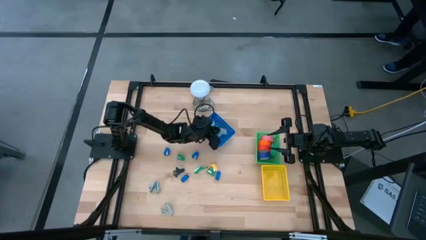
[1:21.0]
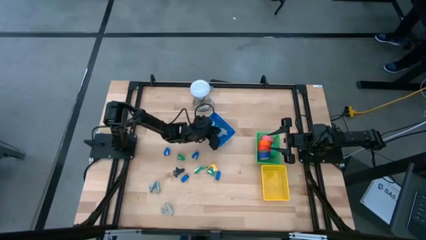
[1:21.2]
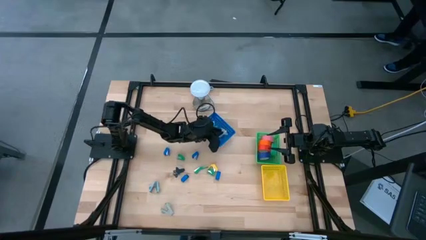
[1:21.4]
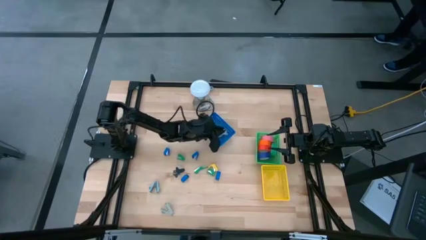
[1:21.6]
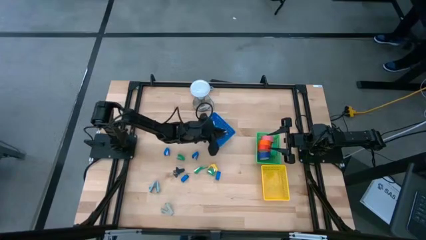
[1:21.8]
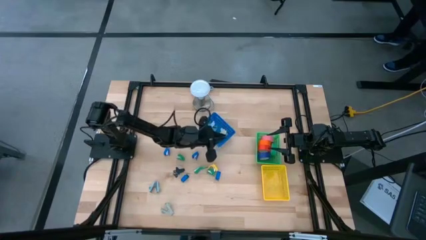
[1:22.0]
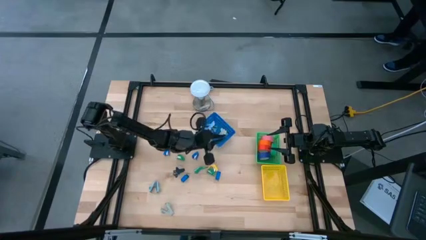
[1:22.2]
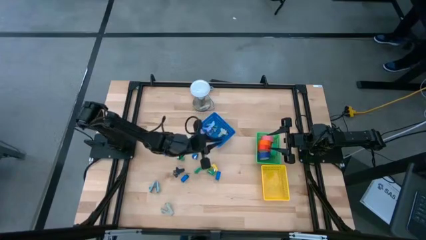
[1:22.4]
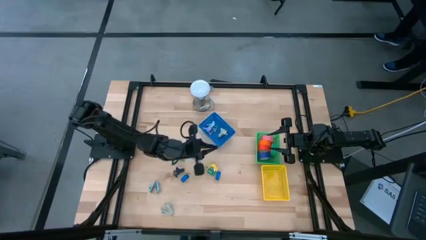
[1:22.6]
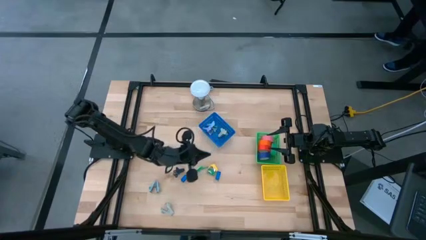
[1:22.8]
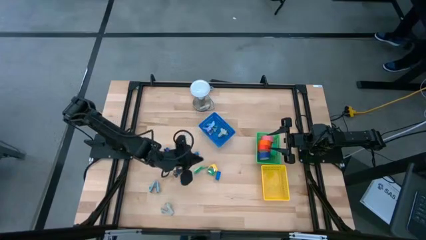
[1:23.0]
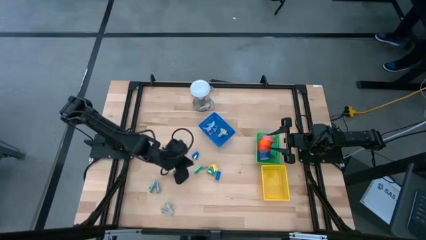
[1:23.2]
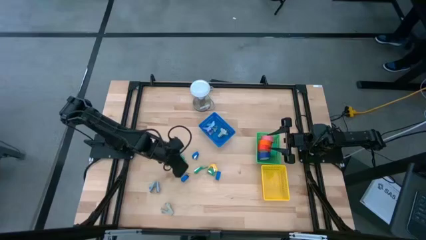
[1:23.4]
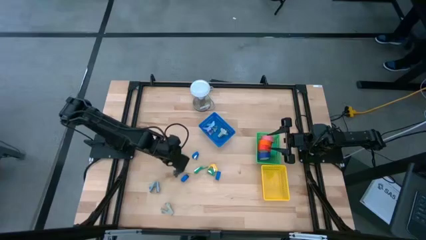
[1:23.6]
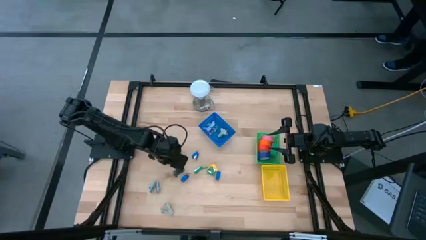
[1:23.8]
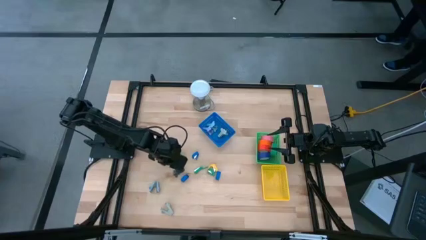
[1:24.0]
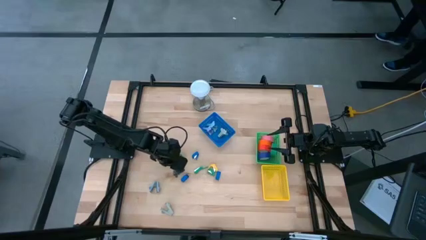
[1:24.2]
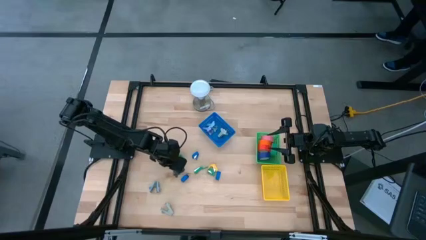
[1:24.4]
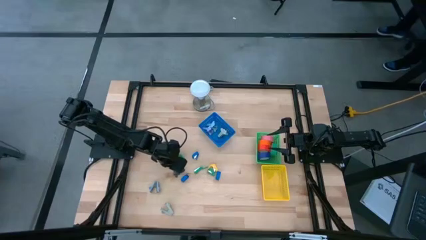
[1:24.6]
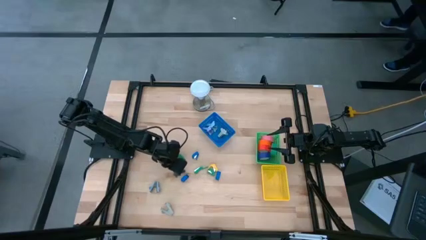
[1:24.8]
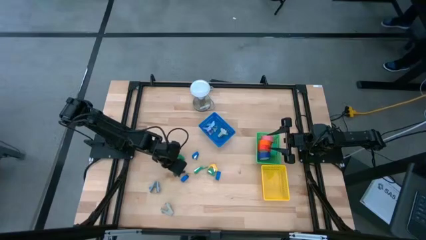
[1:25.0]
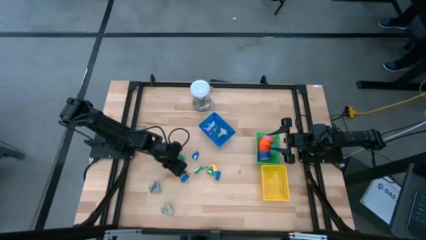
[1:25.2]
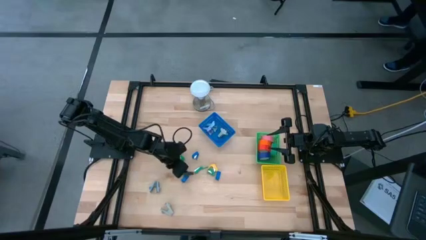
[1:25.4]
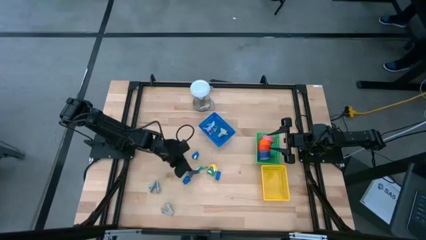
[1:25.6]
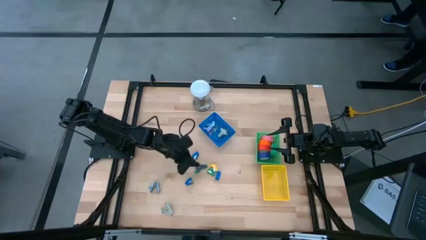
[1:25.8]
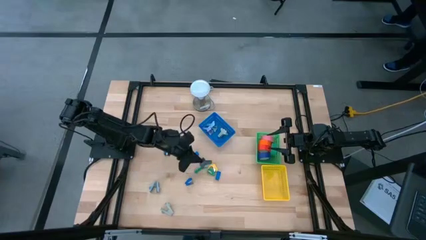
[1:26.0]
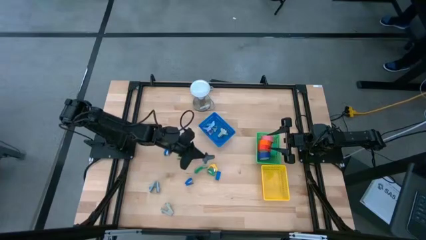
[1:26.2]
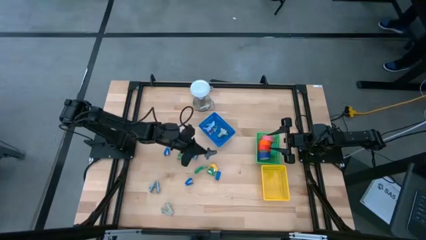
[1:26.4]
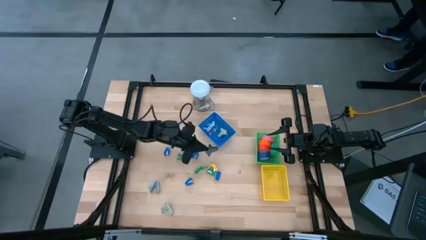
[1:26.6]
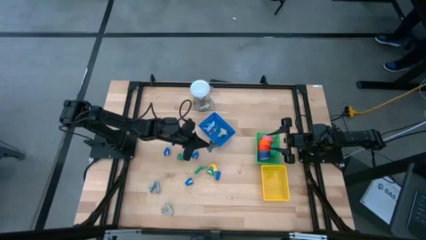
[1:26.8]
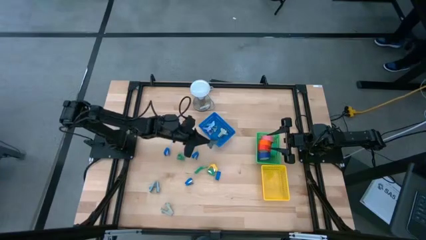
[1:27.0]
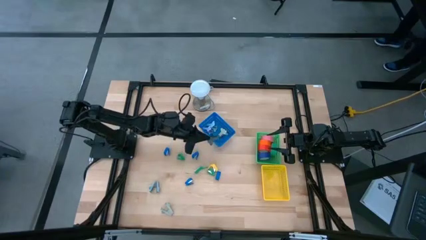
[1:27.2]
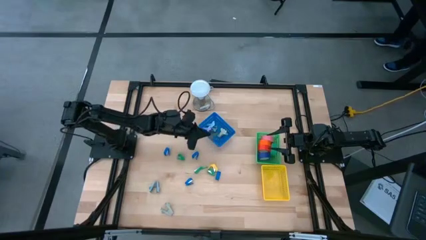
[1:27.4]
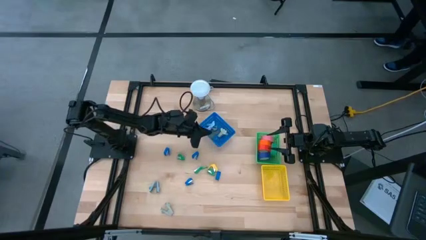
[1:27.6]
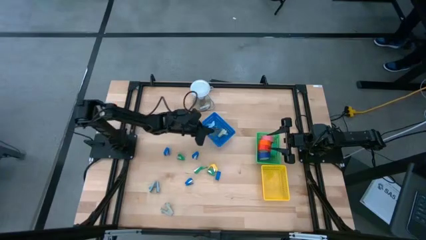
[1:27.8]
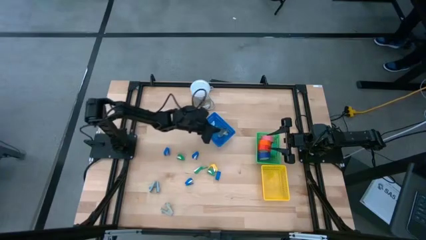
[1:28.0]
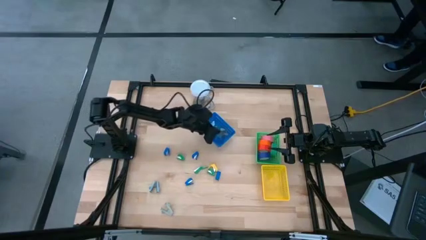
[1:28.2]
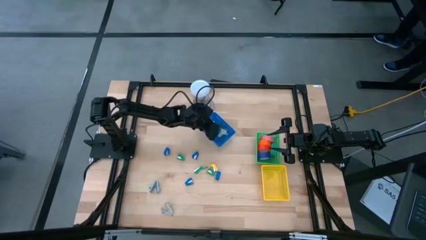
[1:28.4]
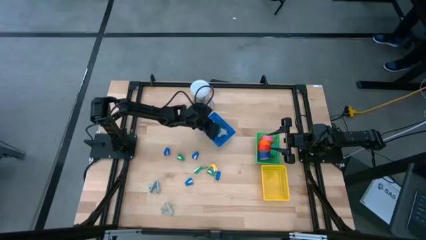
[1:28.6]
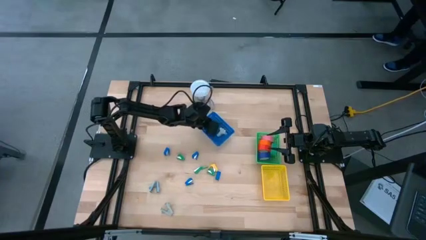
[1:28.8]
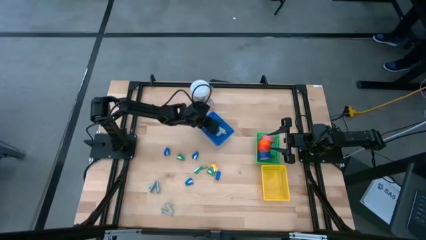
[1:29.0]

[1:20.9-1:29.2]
Task: Pick and place Stapler, Stapler remover, tape
Put the gray stapler remover into the blue bin

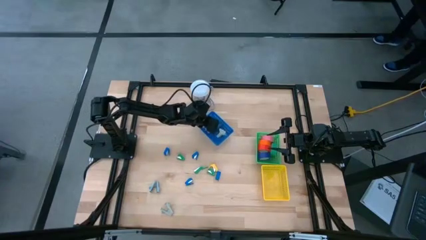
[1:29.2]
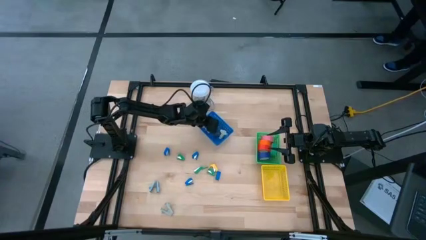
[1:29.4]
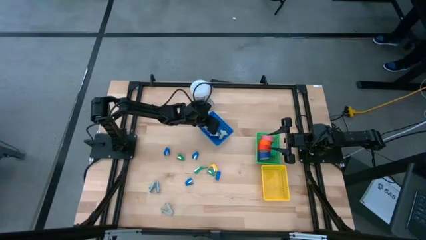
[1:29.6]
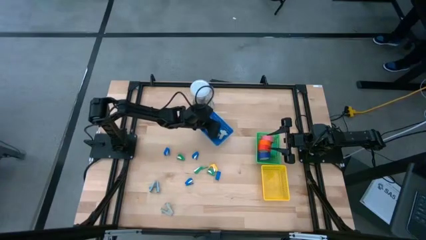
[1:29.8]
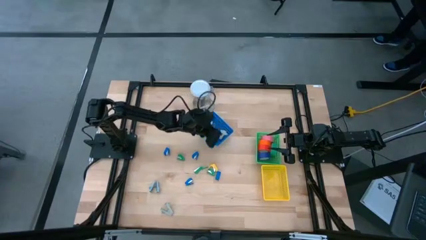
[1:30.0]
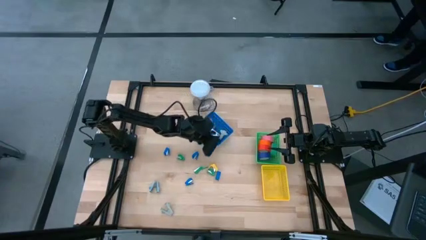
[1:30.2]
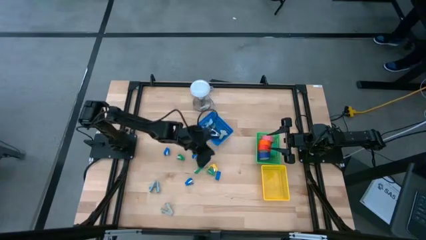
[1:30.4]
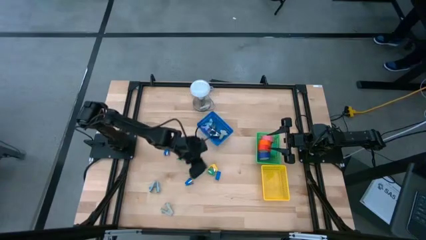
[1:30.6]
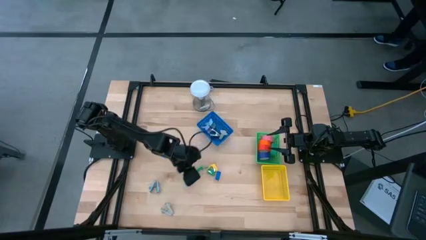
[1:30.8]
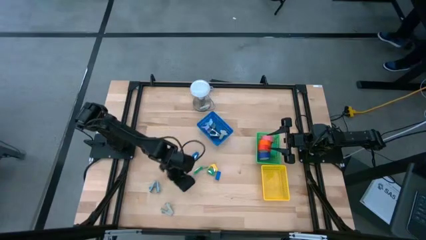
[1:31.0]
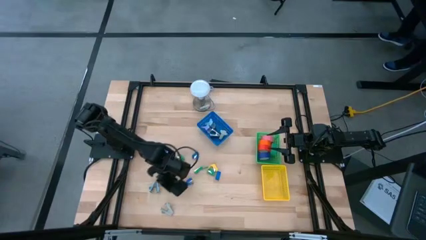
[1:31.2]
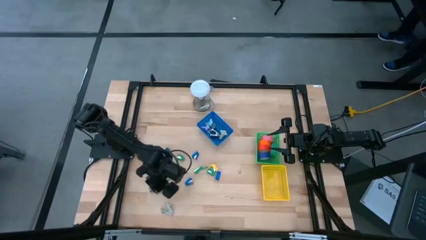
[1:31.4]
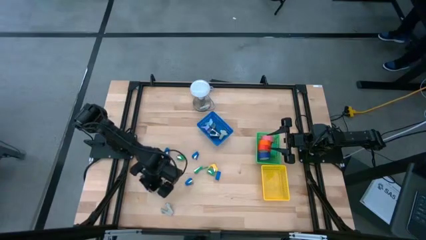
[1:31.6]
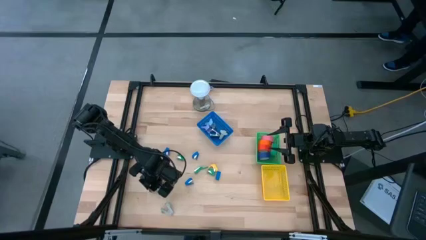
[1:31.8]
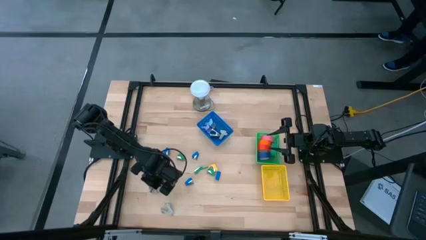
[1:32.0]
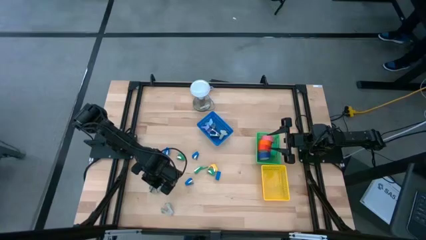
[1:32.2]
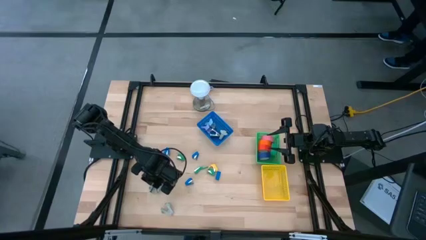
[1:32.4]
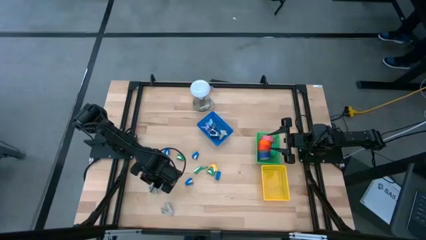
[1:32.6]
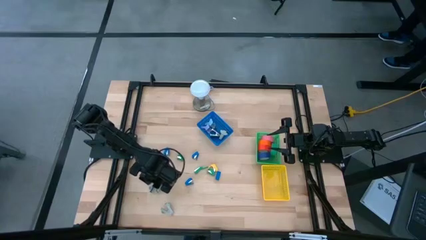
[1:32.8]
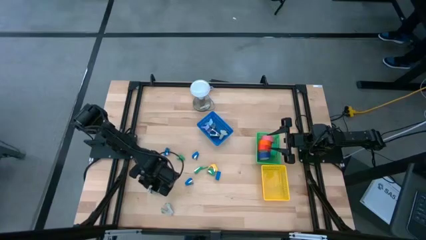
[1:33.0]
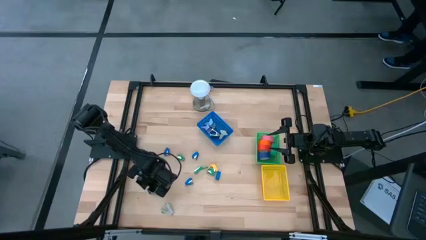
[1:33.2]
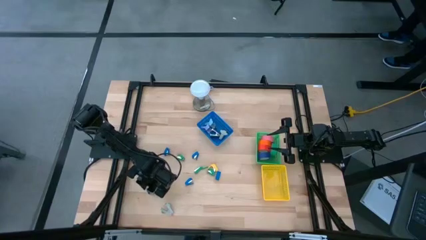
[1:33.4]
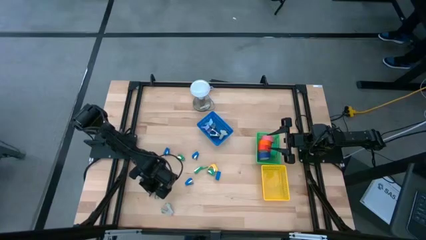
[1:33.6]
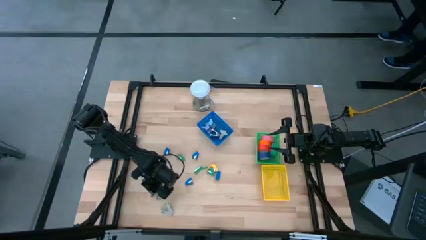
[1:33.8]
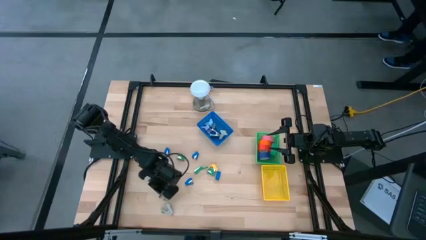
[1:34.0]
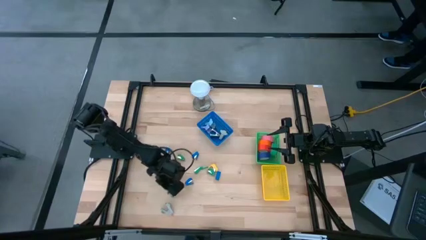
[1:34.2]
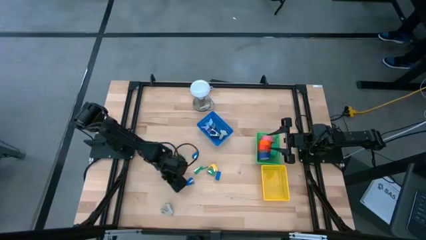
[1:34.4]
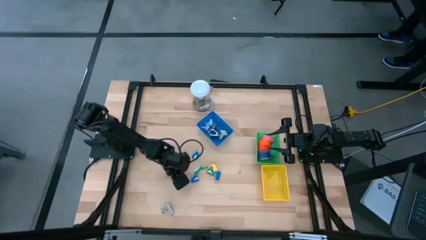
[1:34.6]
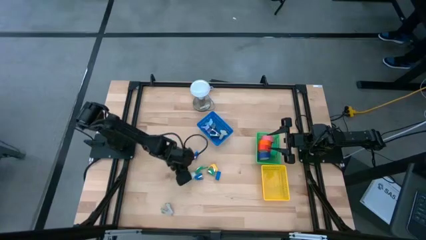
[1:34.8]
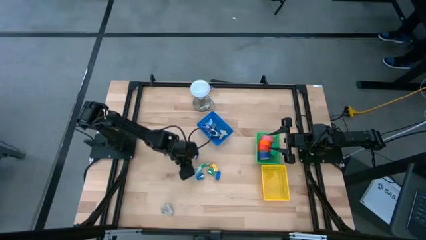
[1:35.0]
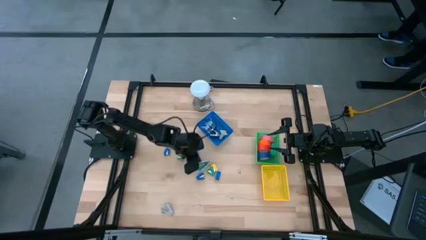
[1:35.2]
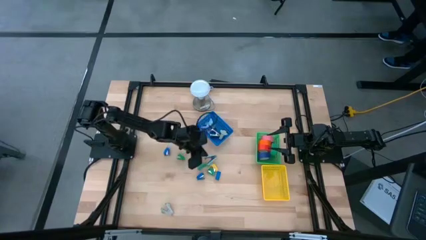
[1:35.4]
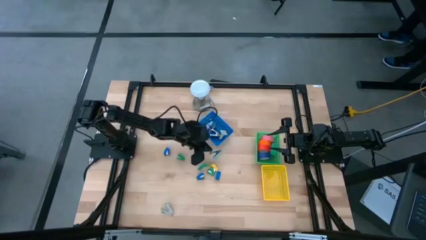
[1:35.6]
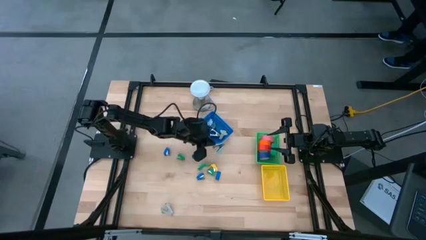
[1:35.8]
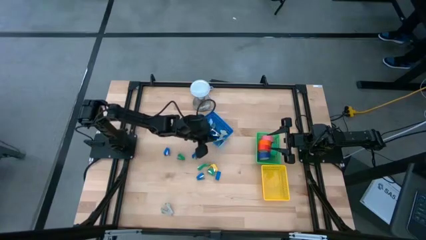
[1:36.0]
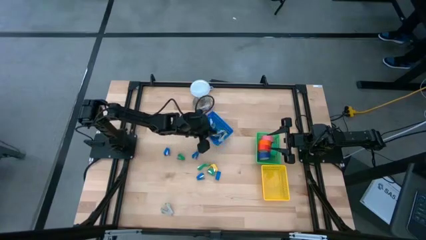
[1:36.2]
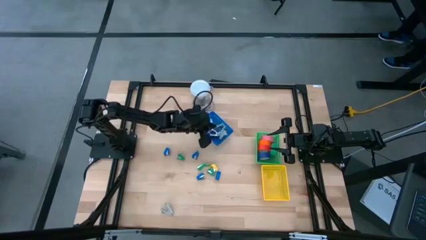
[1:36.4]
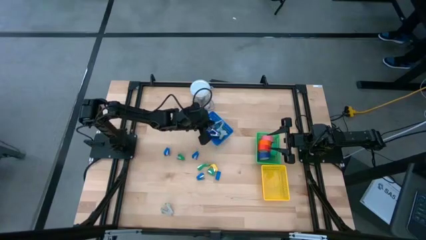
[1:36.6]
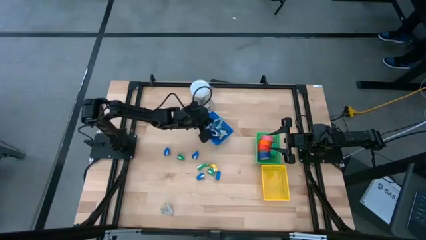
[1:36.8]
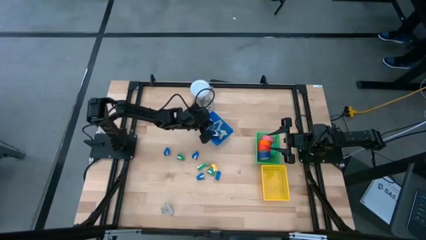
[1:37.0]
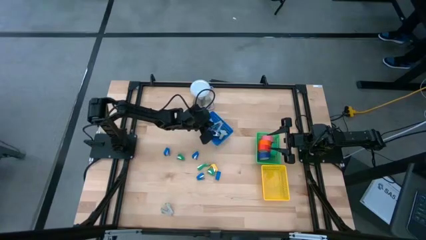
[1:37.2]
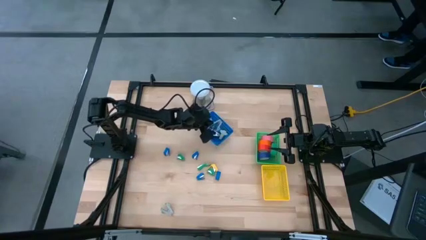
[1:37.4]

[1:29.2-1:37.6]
Put the blue stapler remover into the blue bin
